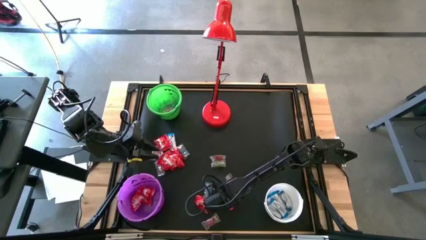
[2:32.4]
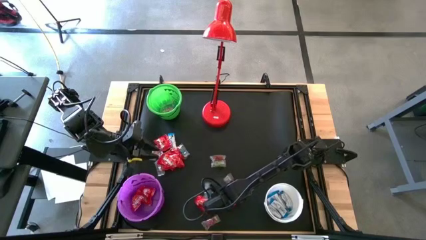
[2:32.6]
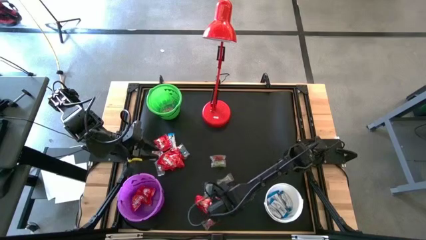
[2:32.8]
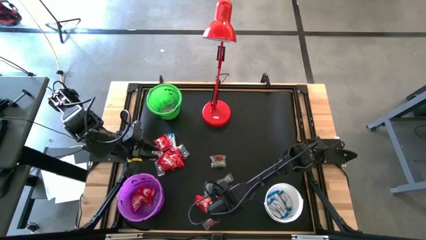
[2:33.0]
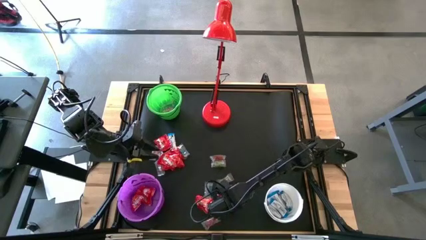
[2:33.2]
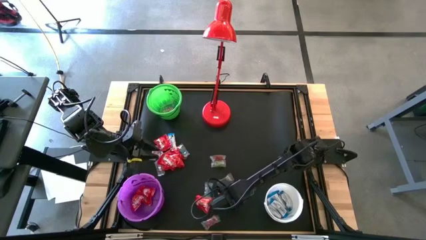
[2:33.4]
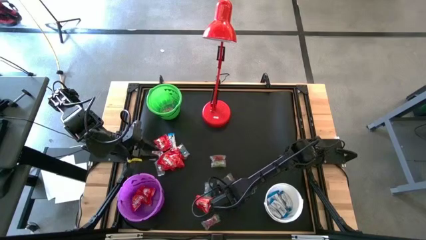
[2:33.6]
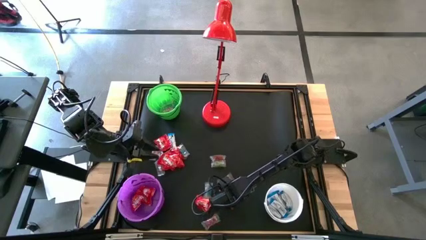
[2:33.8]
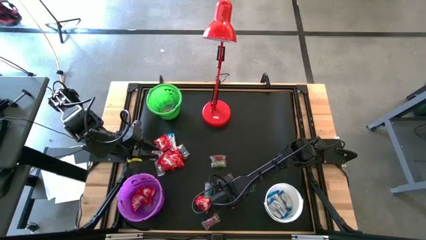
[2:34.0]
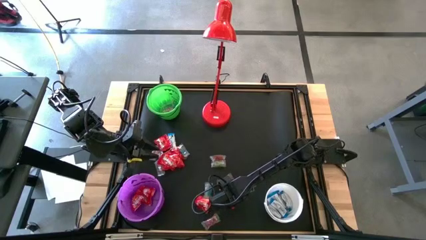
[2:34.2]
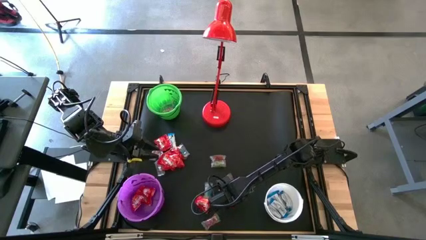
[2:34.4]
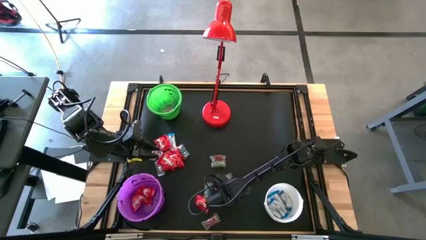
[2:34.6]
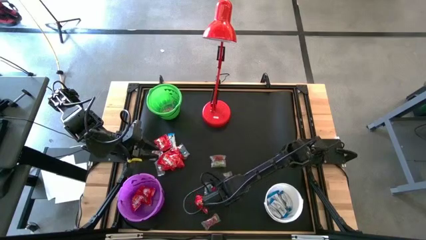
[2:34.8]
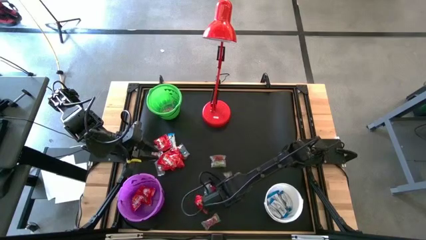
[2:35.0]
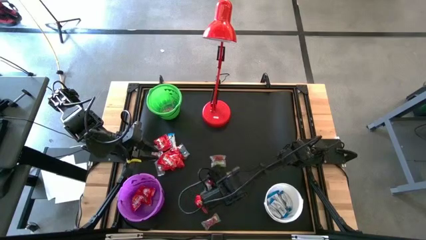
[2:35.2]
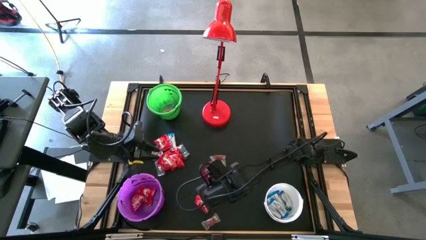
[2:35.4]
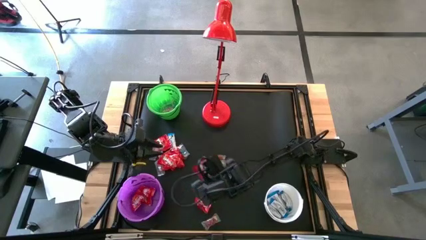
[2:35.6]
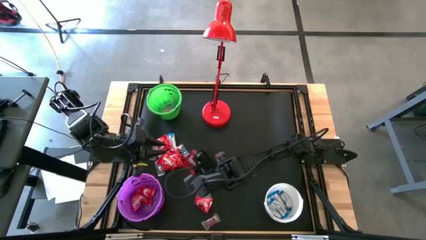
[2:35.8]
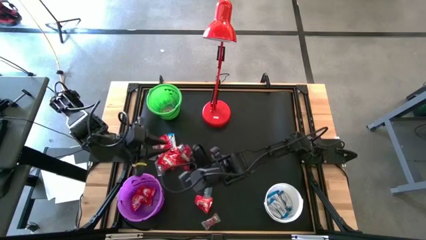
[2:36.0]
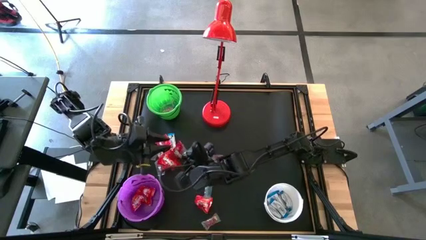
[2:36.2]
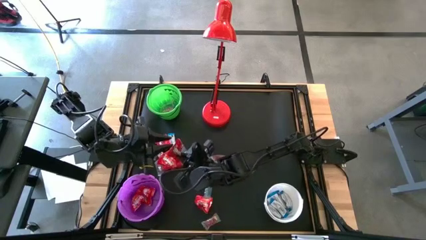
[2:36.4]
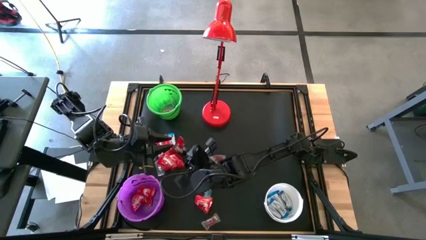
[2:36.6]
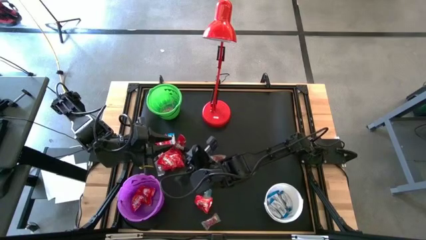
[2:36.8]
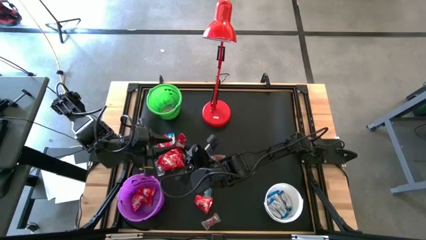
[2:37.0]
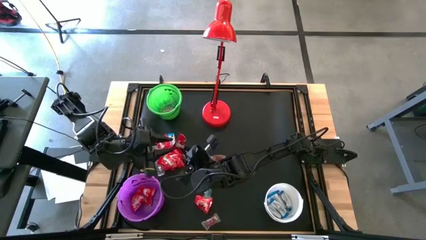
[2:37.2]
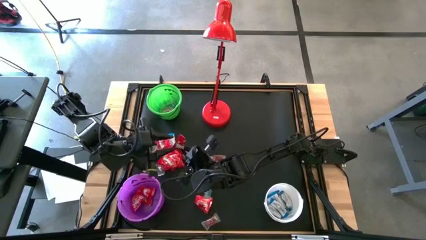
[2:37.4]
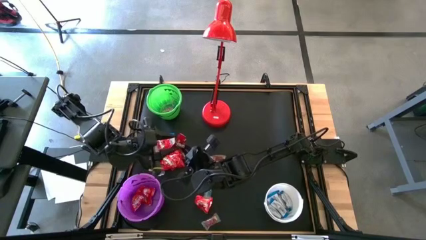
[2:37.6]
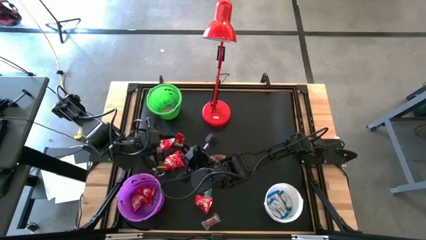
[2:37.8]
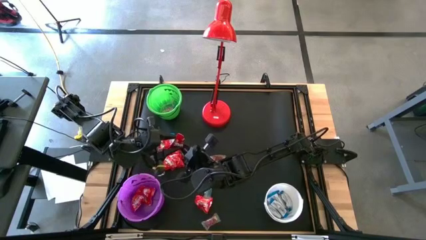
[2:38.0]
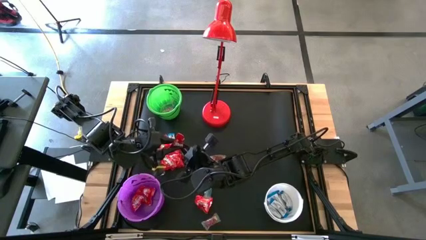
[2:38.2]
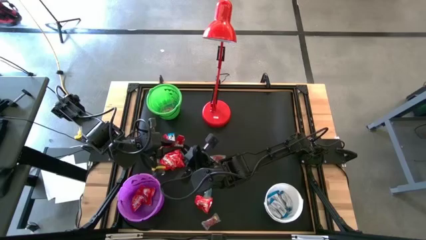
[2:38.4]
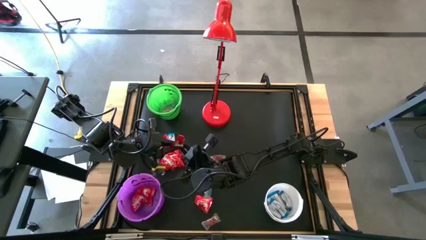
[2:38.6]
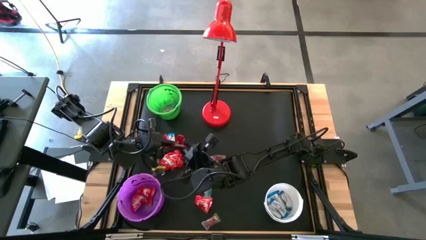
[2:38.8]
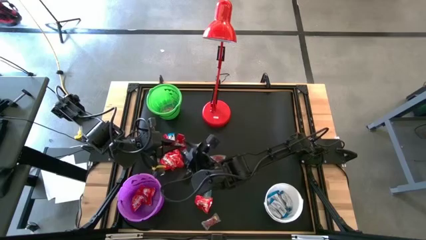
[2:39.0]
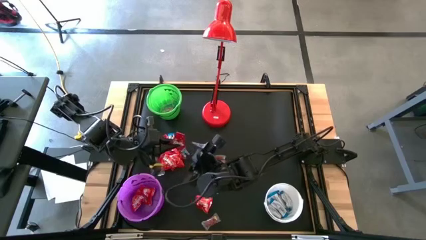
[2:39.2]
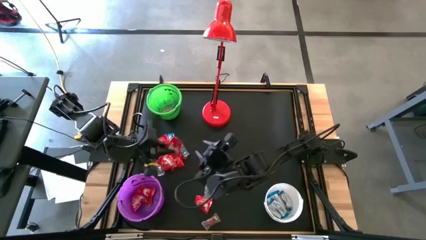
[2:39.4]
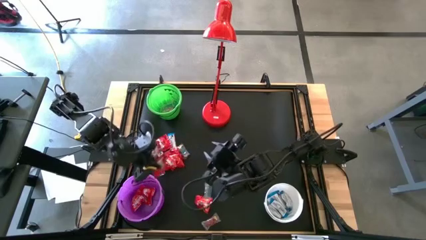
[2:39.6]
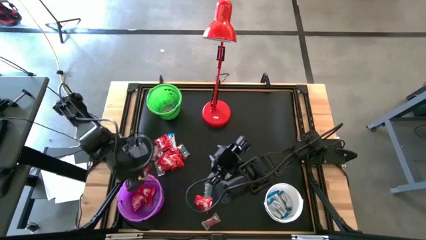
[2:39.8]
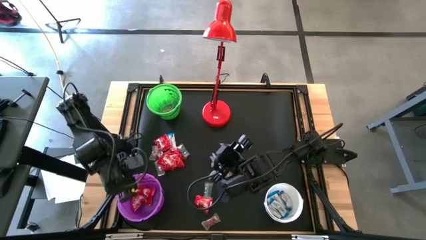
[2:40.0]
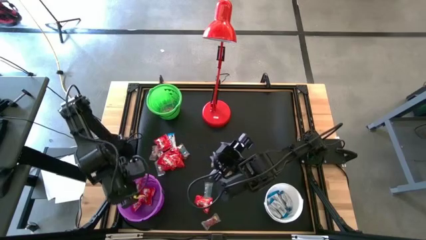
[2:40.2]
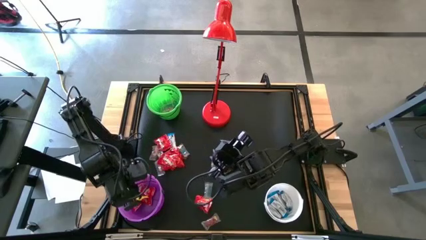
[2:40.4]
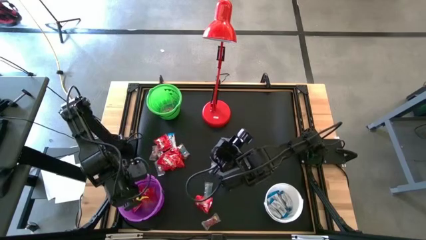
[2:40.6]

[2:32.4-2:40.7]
Task: Sort candy
Put the red candy into the purple bucket

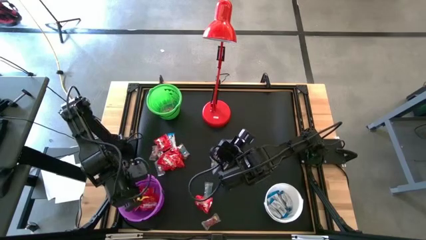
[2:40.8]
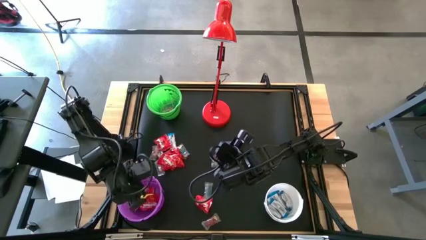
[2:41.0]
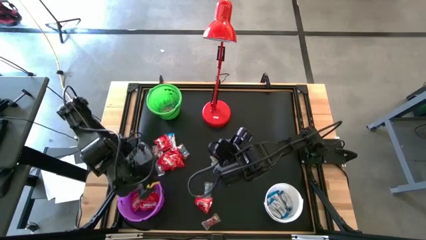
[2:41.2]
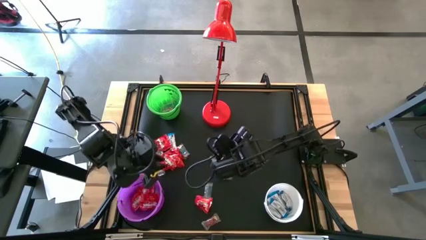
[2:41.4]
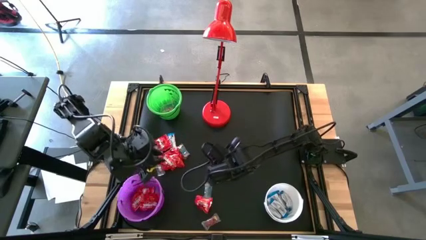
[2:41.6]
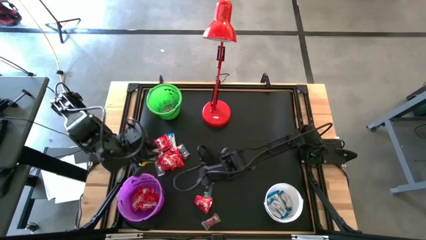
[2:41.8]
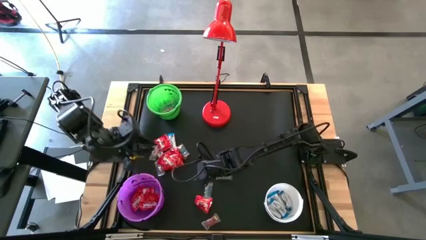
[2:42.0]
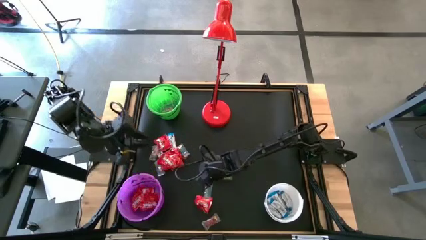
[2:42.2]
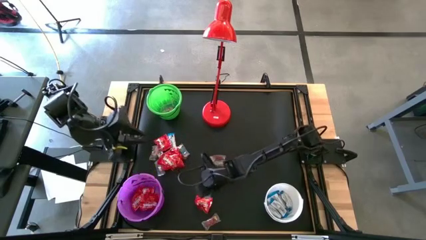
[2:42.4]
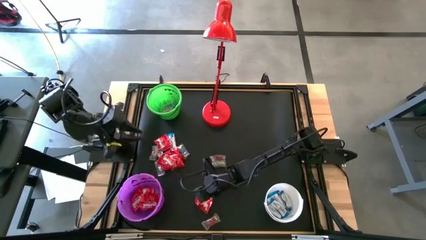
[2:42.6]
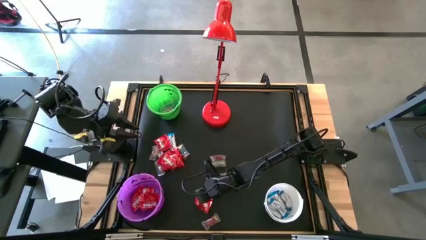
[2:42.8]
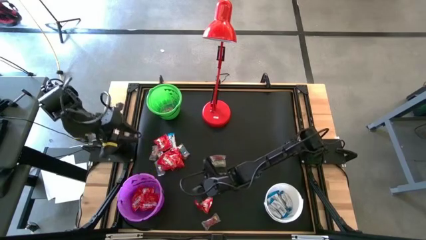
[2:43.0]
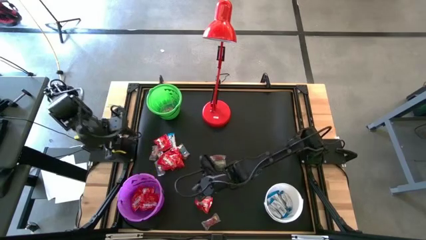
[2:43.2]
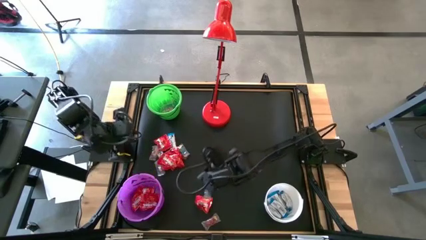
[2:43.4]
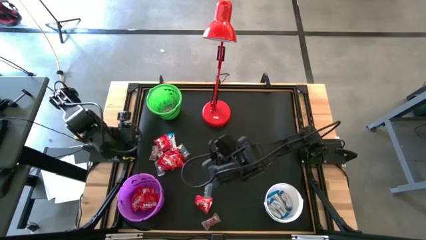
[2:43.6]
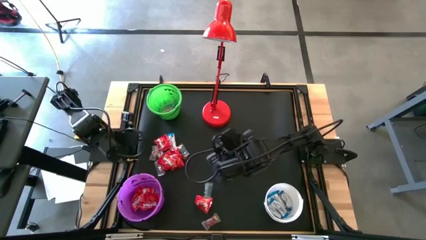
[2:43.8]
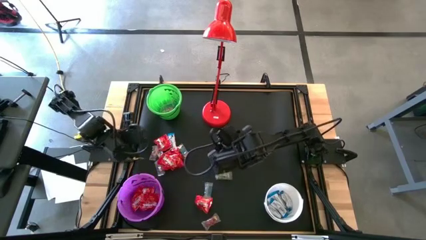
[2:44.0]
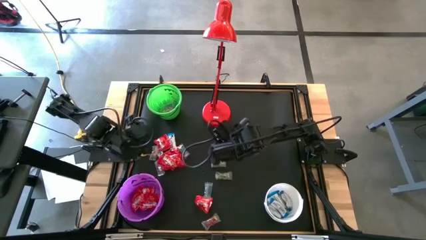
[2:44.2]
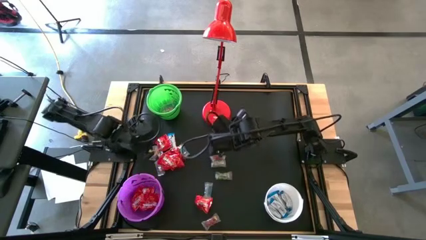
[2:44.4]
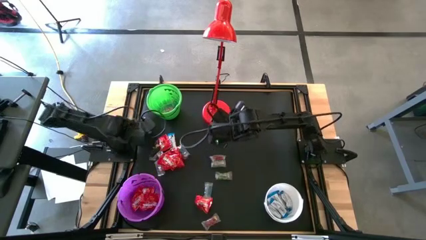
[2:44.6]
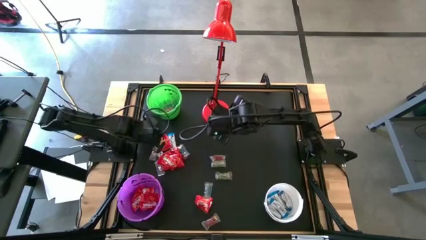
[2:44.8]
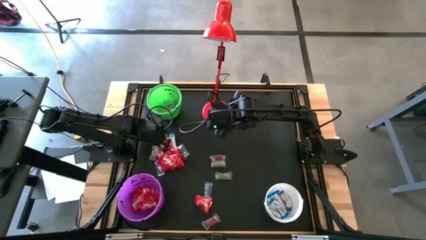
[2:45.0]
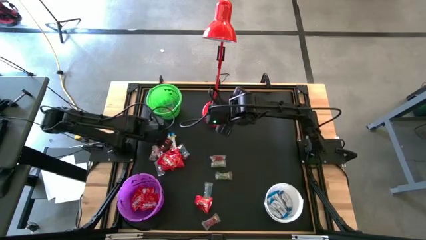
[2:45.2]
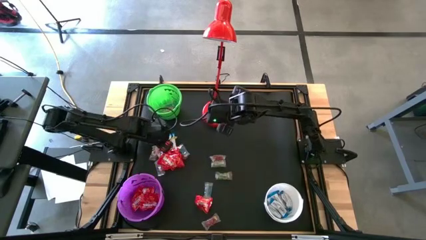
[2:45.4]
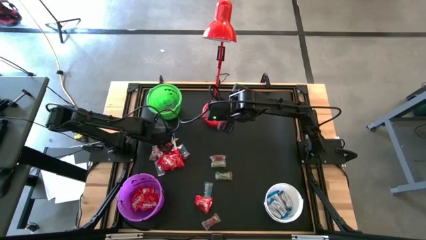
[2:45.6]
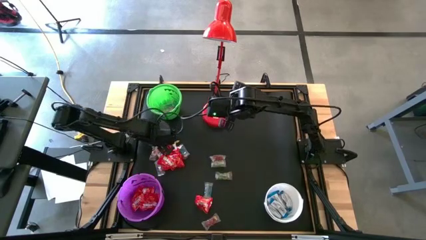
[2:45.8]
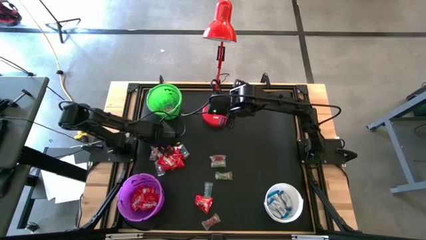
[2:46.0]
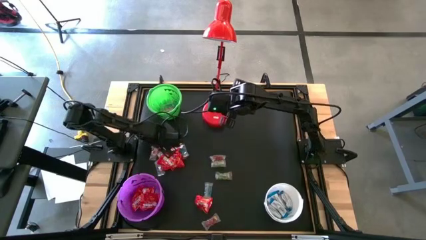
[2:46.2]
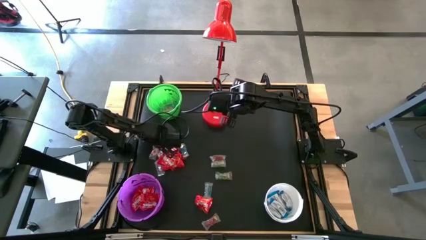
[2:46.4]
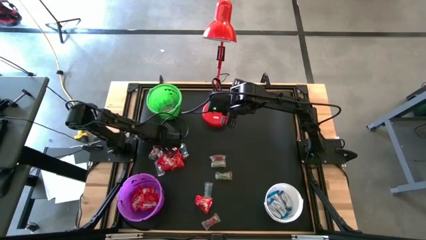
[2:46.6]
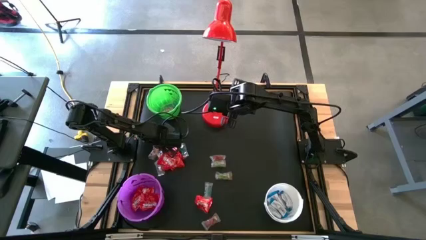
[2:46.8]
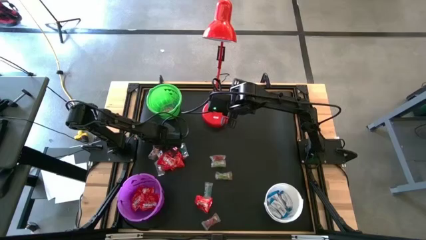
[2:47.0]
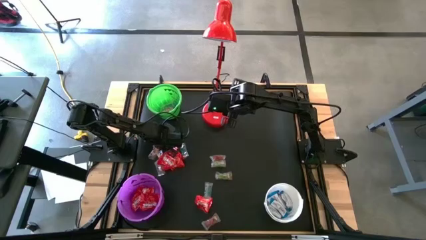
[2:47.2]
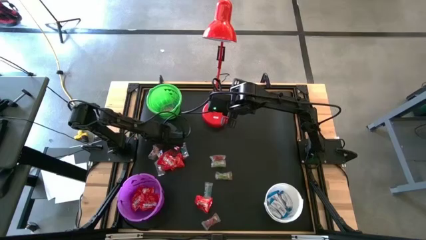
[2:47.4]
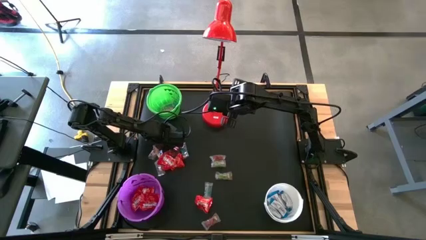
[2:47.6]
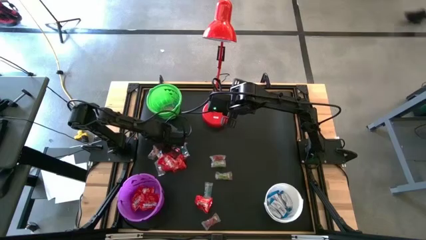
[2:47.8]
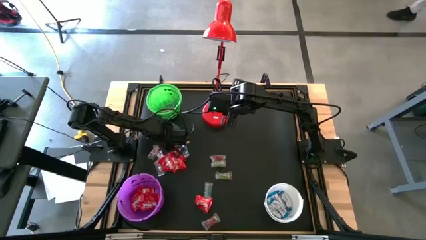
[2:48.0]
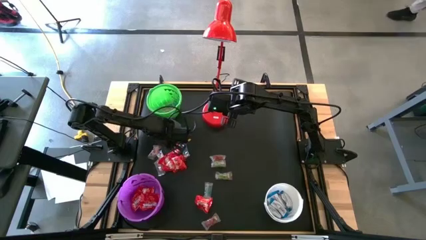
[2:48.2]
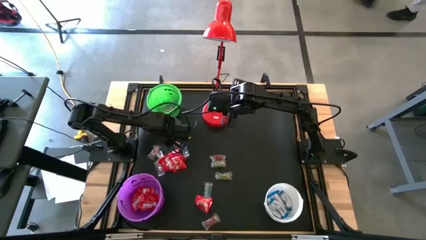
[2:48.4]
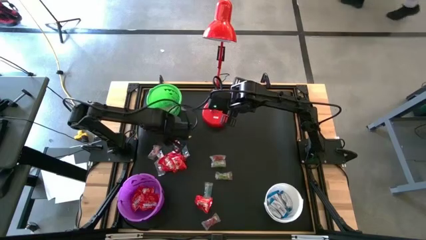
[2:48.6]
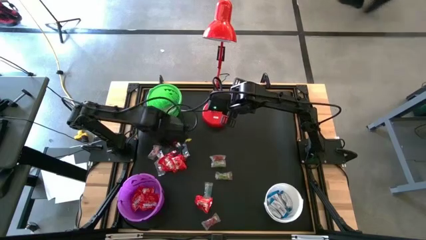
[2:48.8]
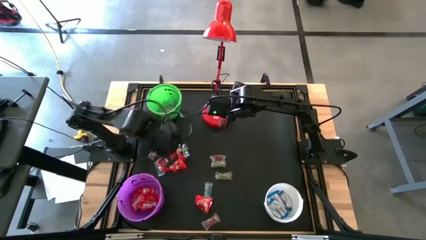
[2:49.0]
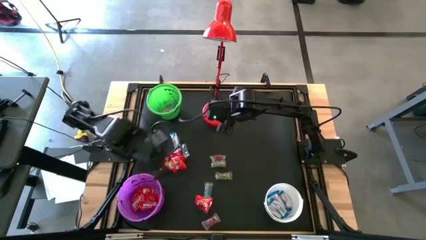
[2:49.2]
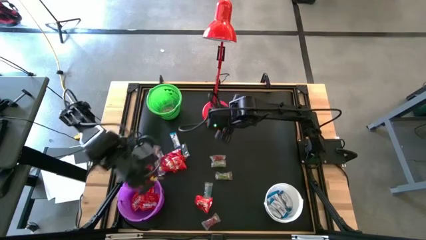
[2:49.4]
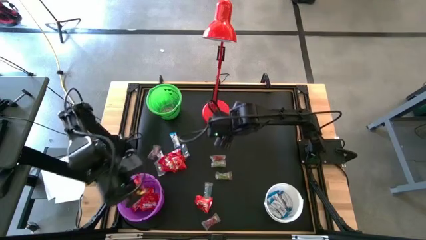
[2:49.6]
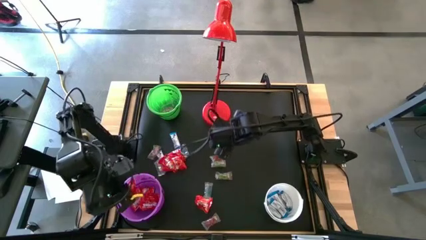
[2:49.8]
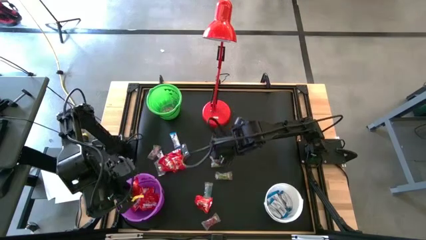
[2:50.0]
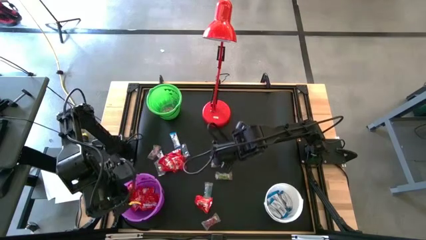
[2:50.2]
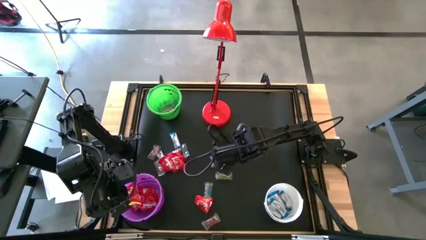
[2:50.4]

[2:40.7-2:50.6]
Put the red candy into the purple bucket
